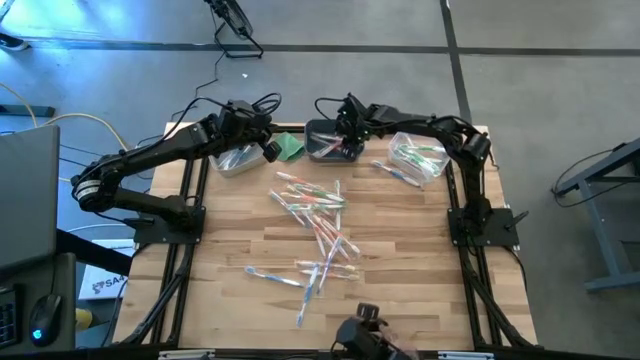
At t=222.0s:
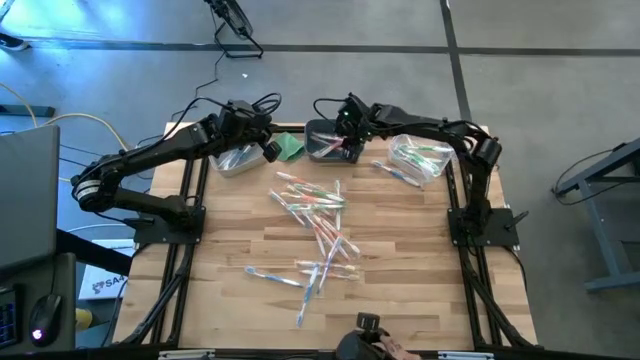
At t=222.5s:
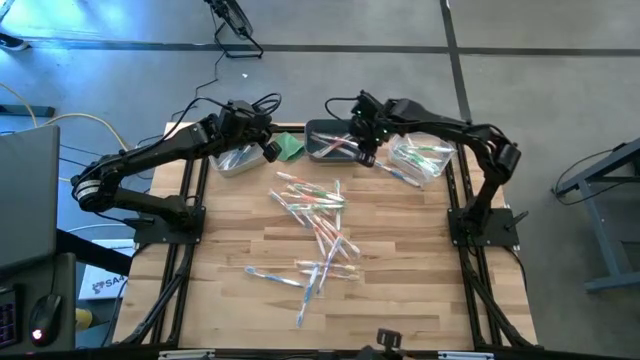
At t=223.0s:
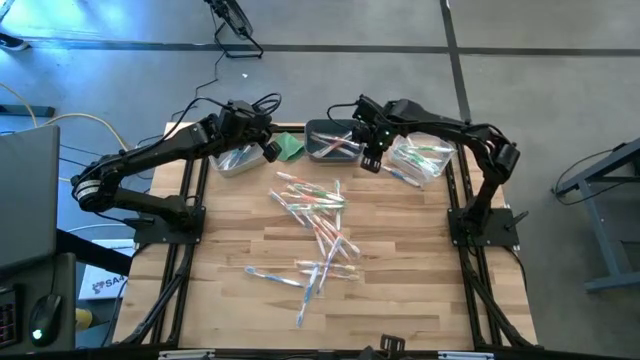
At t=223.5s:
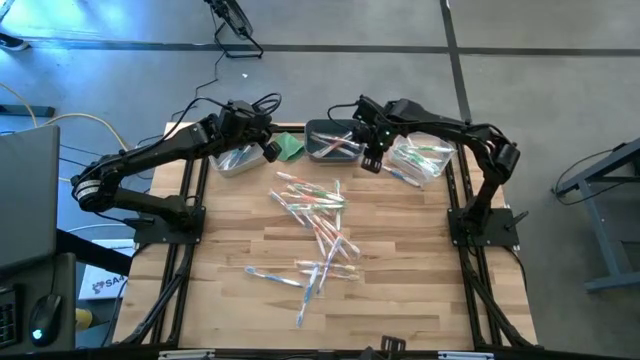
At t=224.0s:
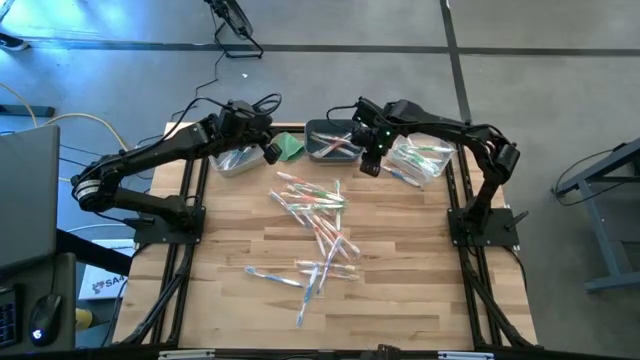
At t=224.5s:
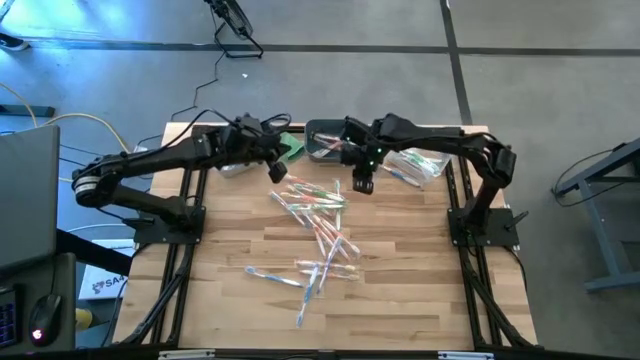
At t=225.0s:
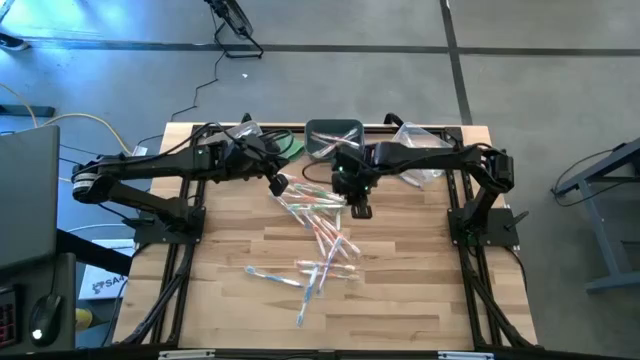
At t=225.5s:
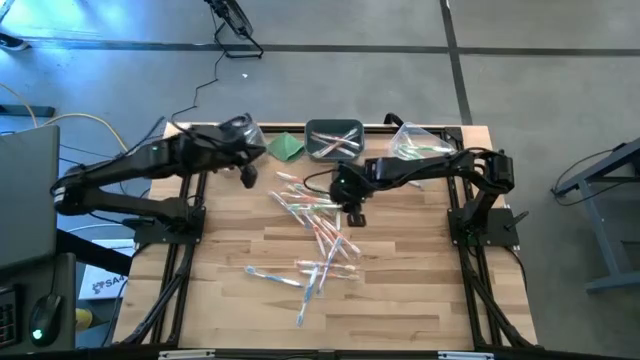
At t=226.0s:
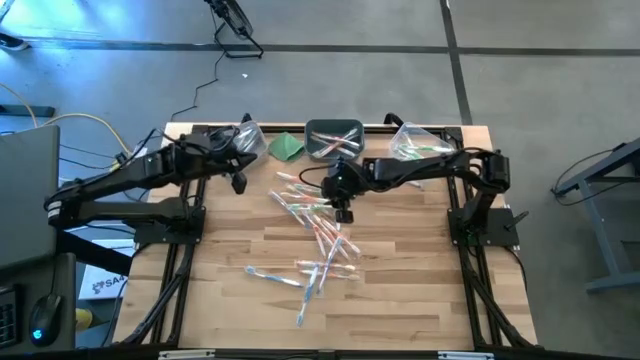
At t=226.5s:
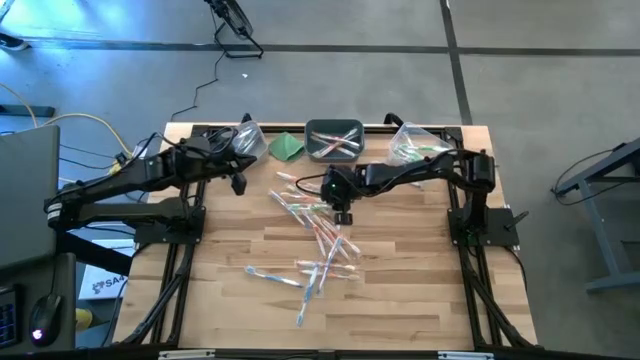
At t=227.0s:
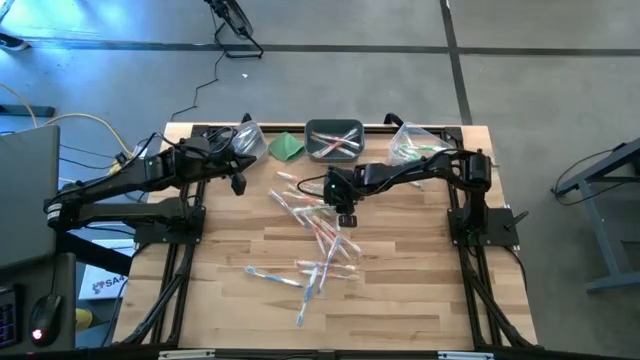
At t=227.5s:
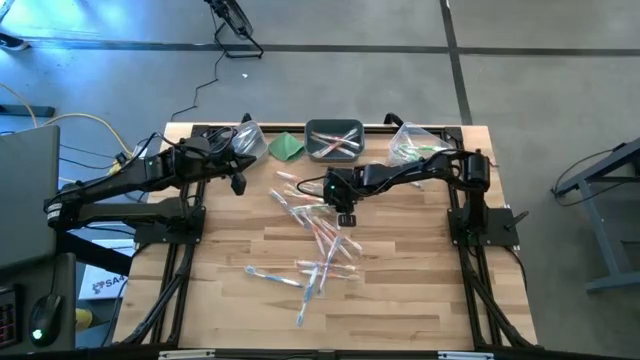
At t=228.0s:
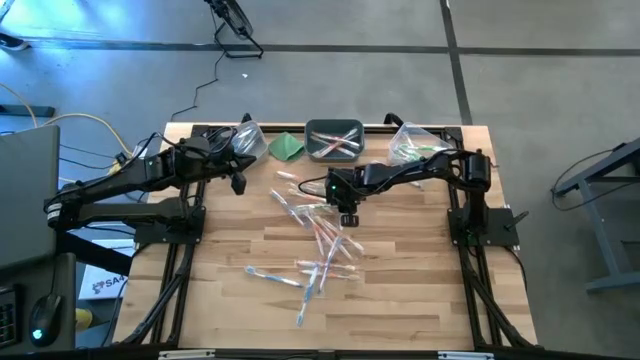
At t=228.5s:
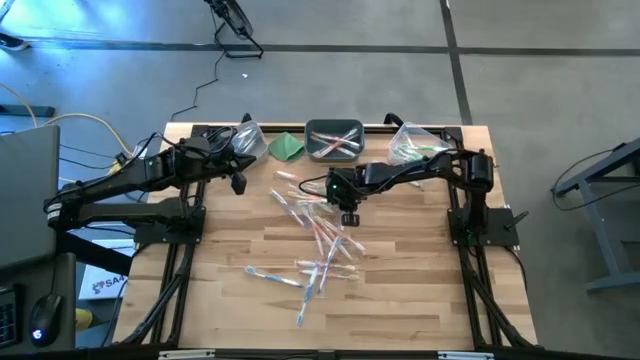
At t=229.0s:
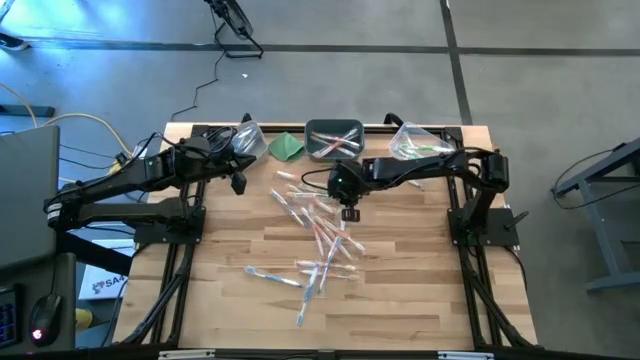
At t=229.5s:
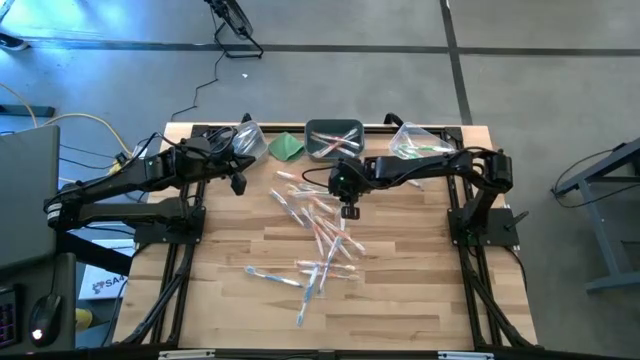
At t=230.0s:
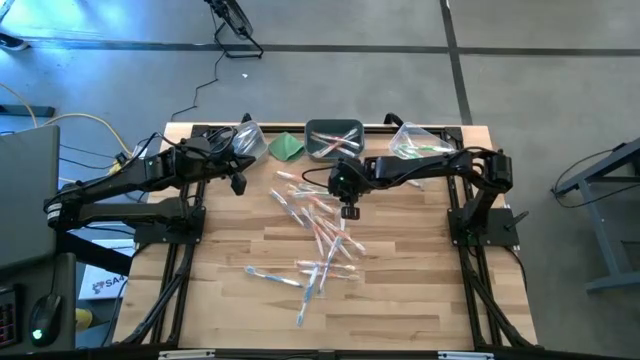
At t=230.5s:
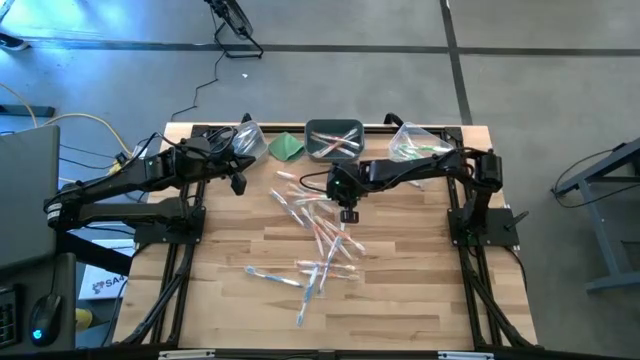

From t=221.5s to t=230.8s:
Task: Pick & Place Toothbrushes
Put the bottom green toothbrush into the transparent bin

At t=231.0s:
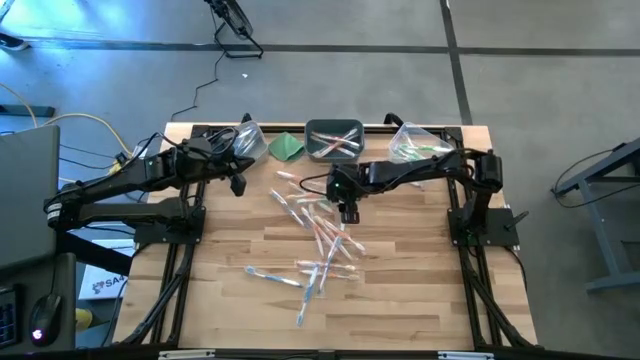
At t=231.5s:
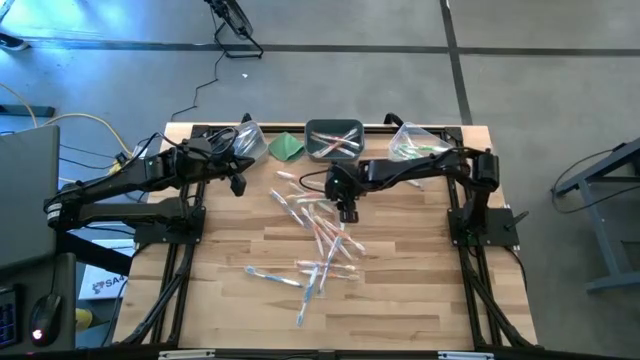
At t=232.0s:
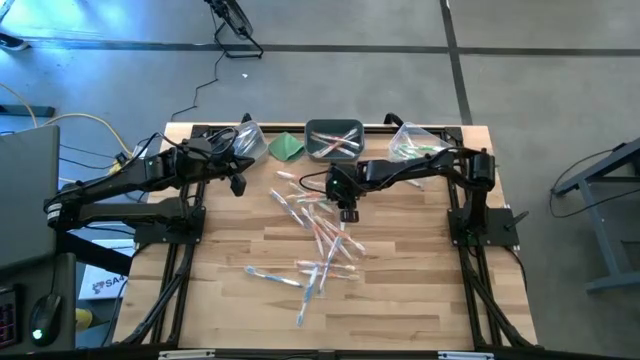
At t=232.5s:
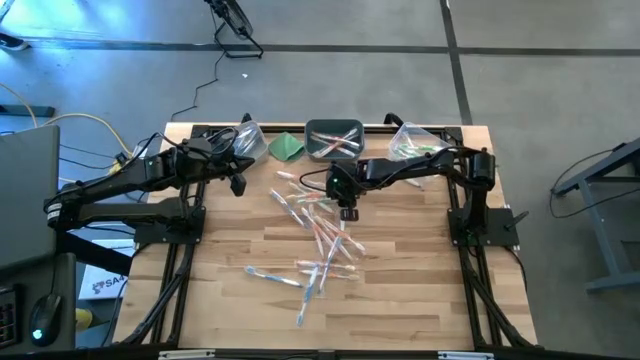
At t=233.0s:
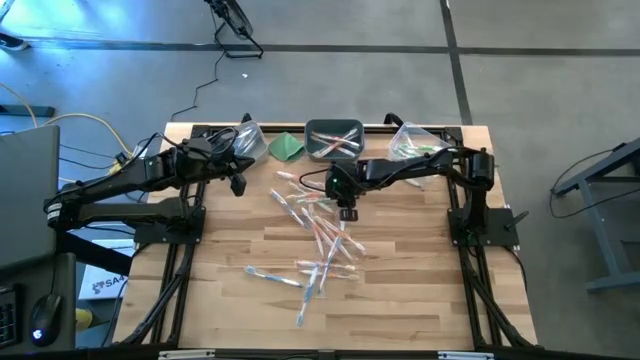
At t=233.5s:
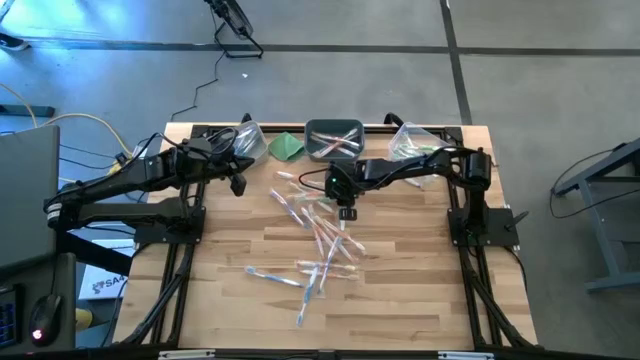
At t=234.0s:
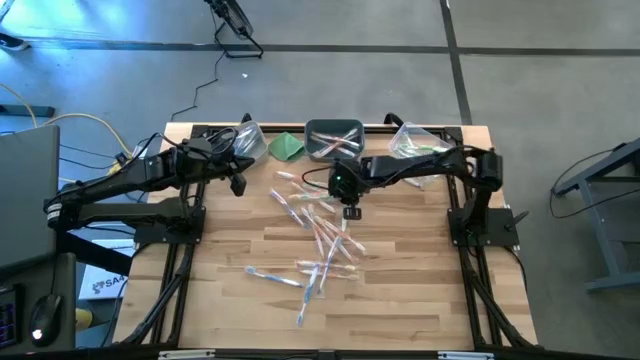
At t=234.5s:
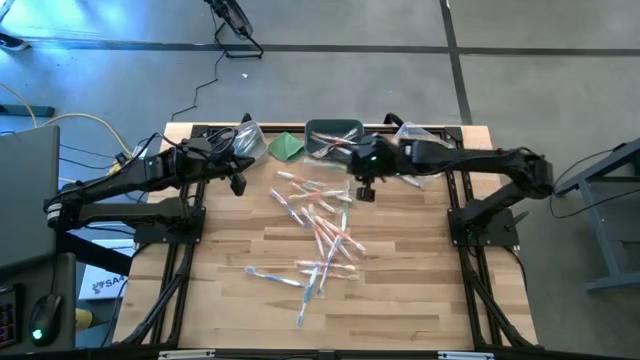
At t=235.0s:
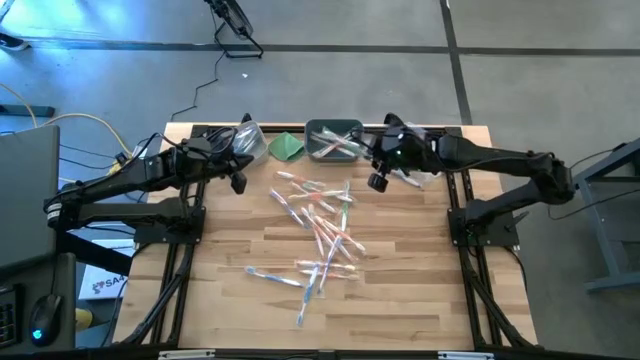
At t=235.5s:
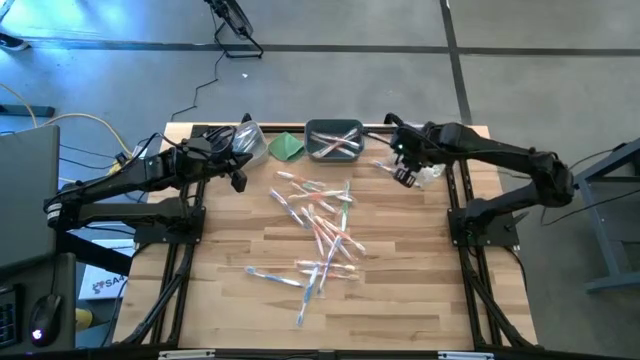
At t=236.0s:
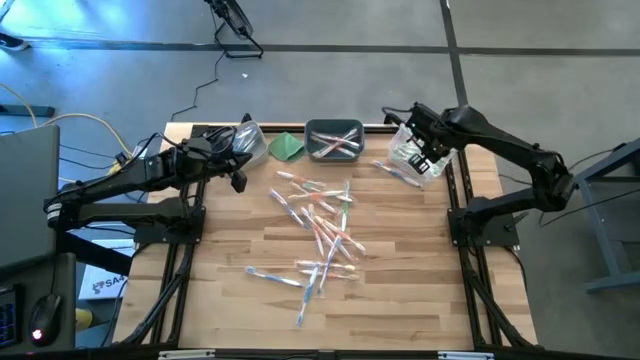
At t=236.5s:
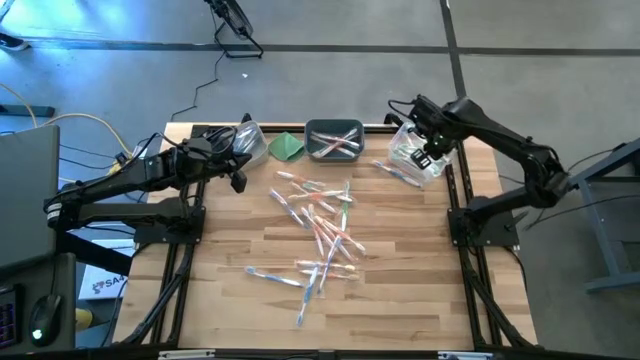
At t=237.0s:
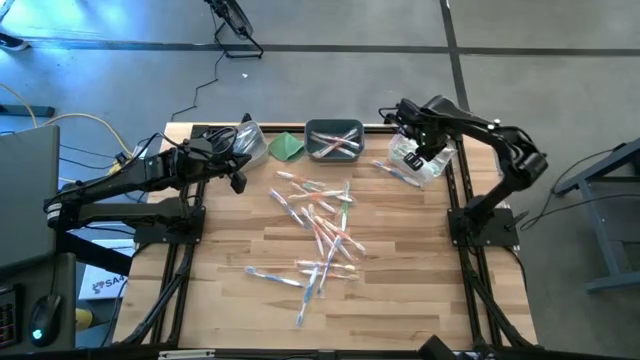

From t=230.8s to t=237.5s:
Put the bottom green toothbrush into the transparent bin

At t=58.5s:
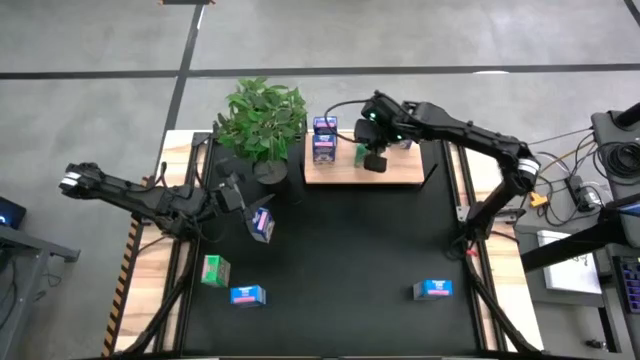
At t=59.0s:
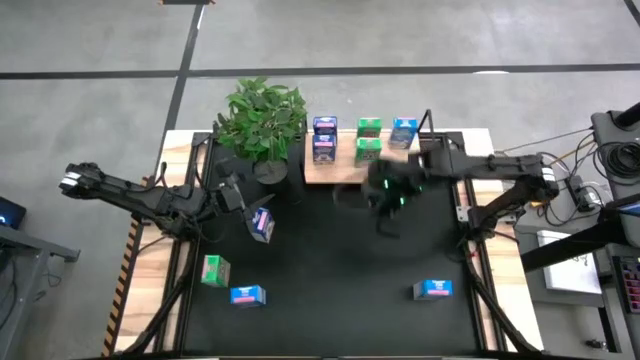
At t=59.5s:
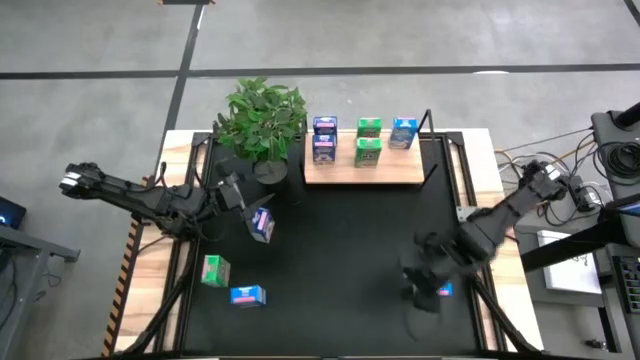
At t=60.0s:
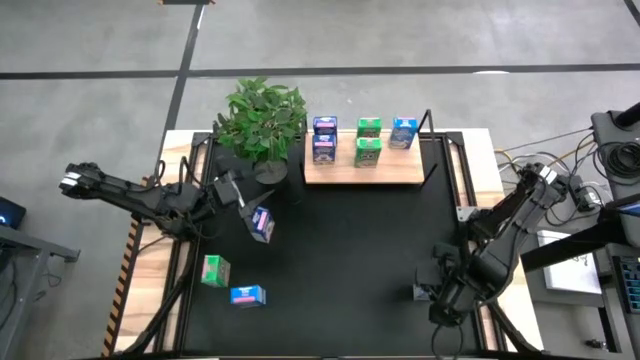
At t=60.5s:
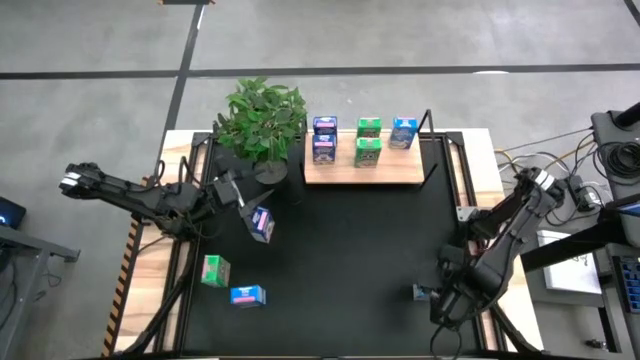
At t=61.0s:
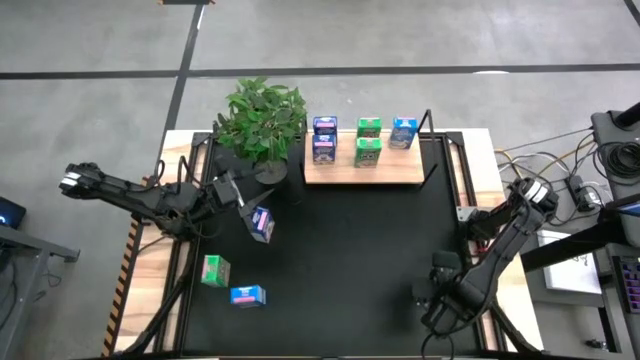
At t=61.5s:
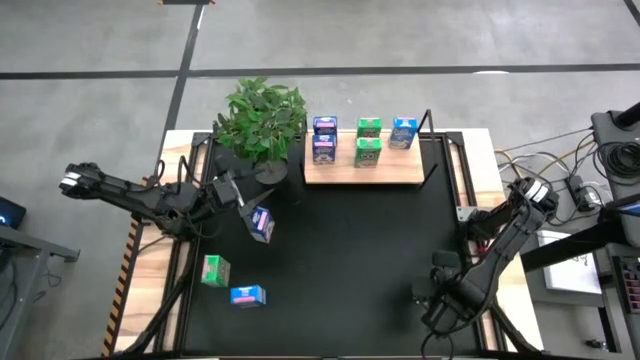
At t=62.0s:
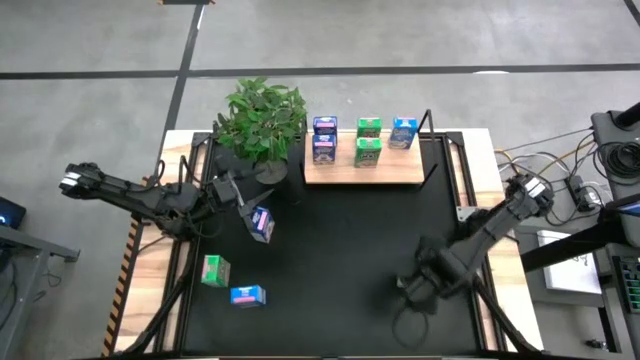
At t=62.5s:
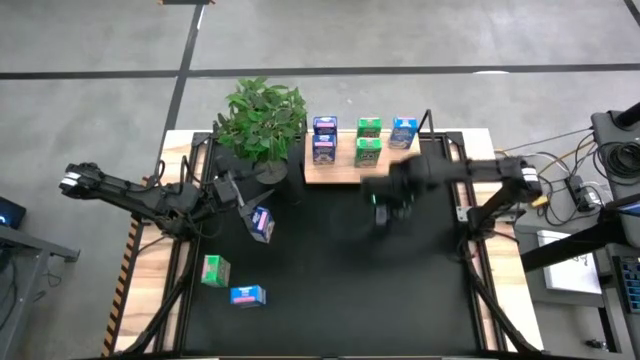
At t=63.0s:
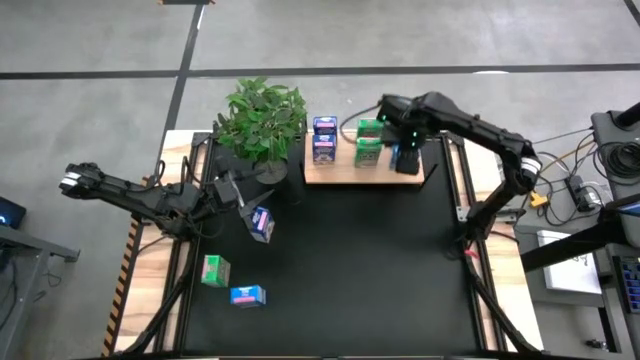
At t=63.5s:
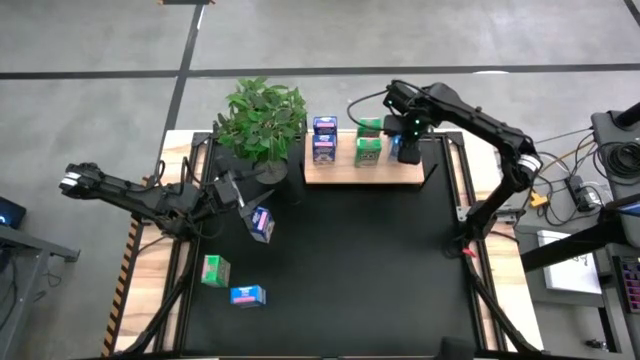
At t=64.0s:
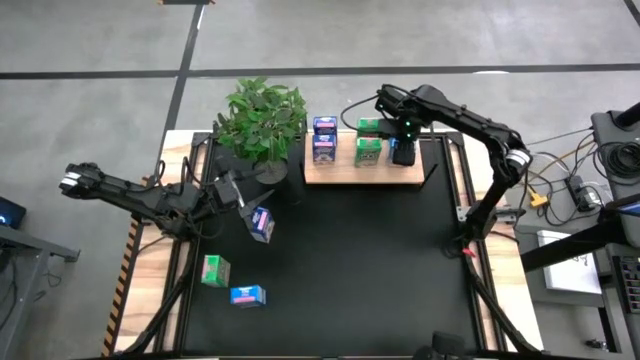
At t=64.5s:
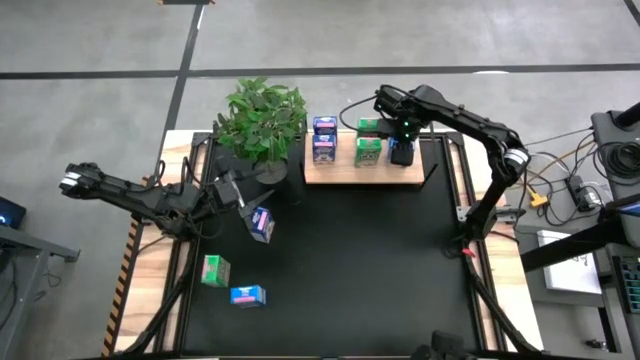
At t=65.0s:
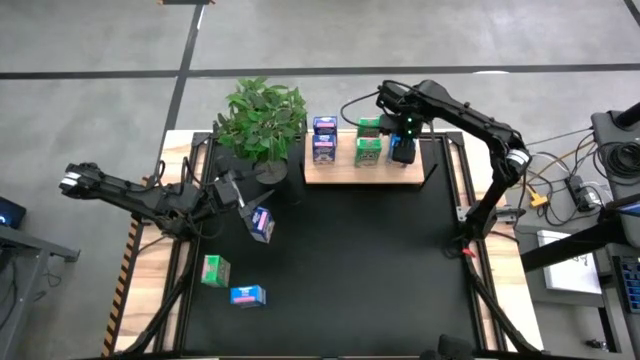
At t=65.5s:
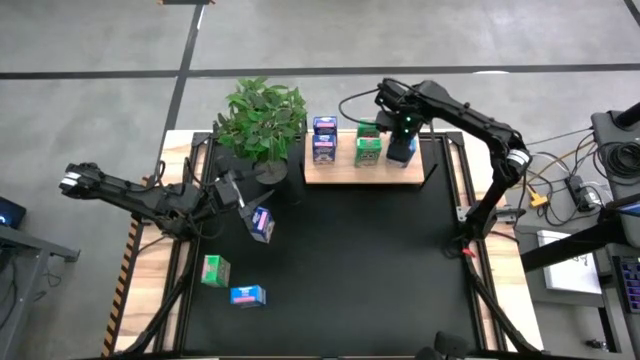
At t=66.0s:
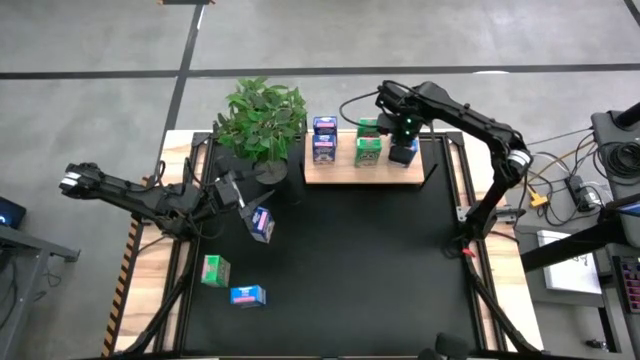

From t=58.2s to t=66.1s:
Task: Stack cereal on shelf
Put the right light blue cereal box on the shelf aligned with the other light blue cereal box
